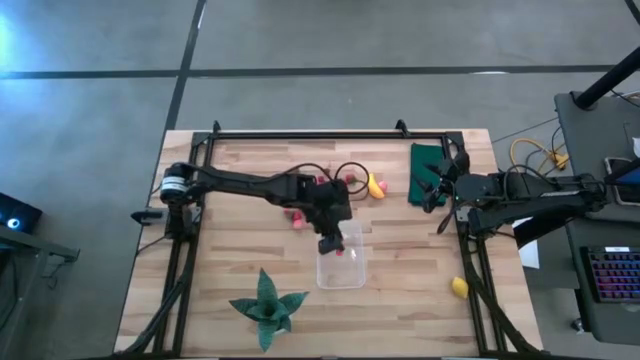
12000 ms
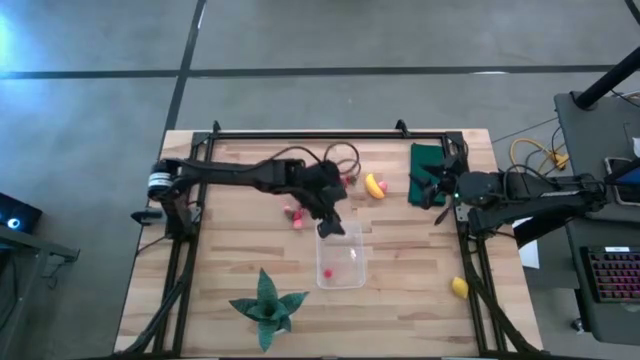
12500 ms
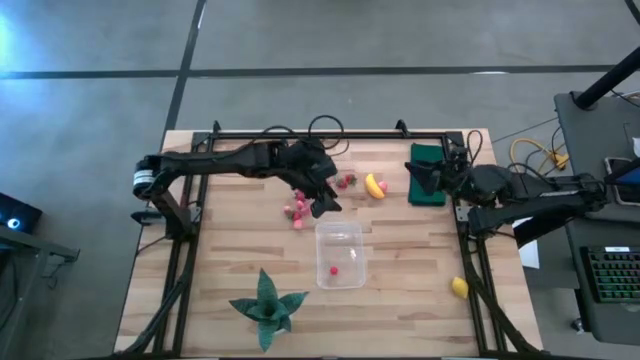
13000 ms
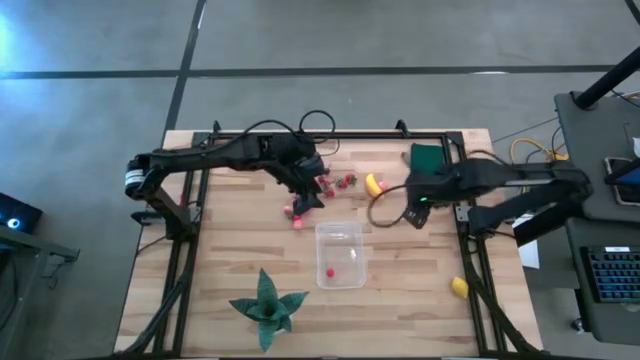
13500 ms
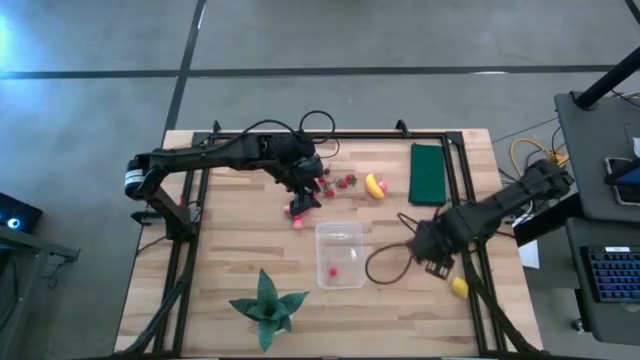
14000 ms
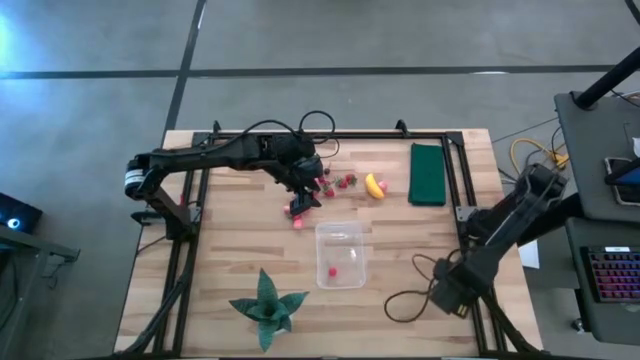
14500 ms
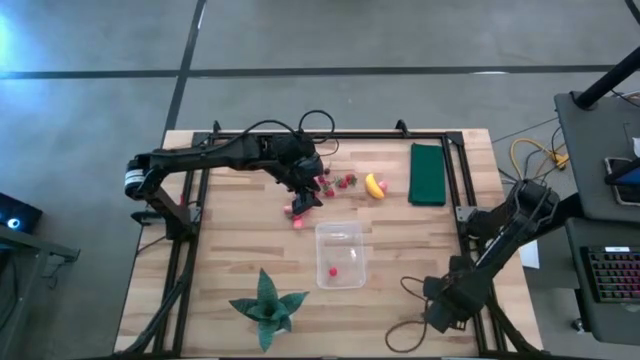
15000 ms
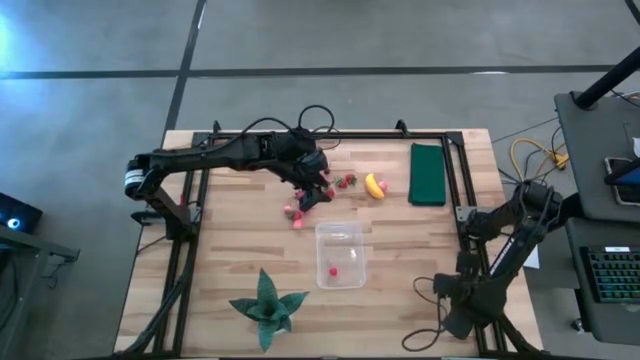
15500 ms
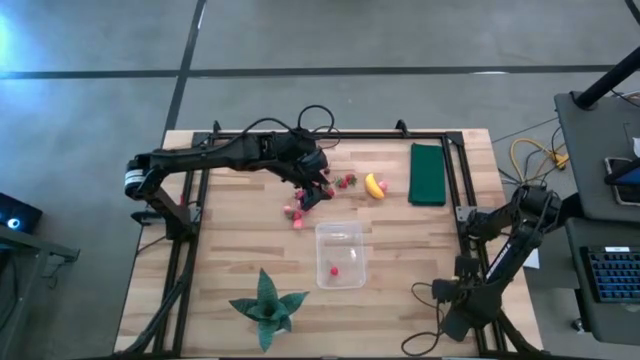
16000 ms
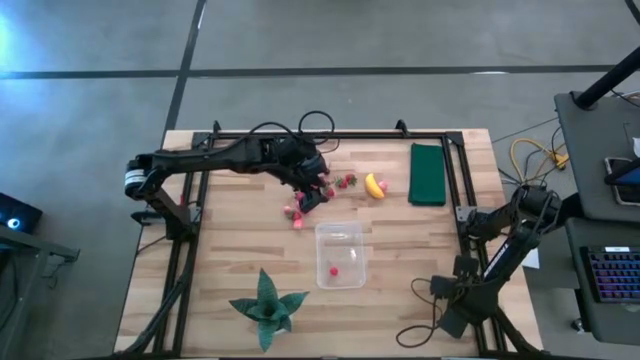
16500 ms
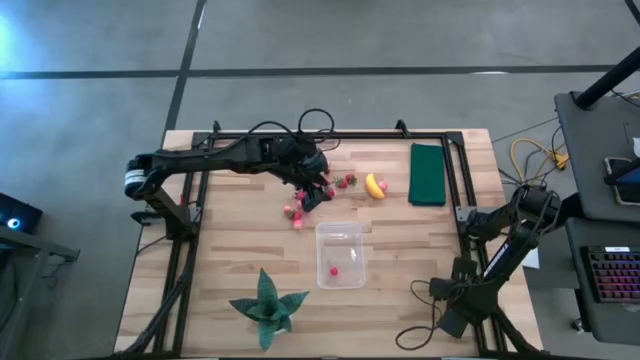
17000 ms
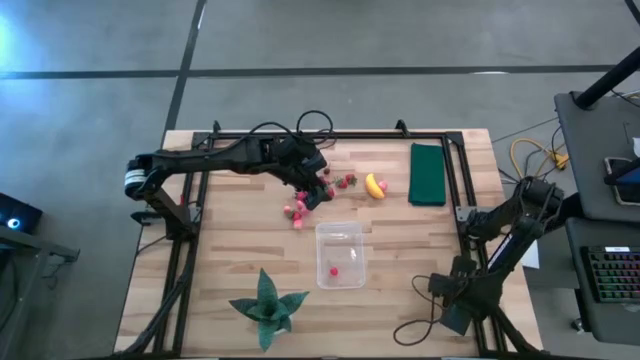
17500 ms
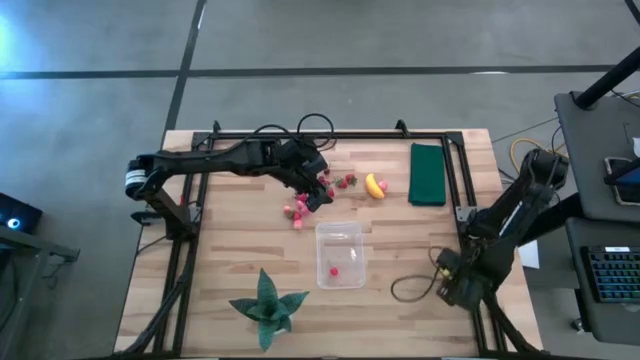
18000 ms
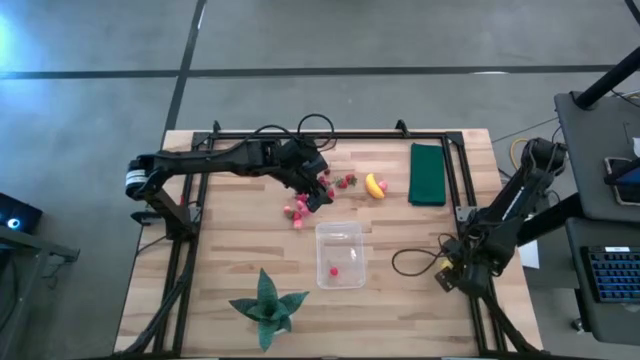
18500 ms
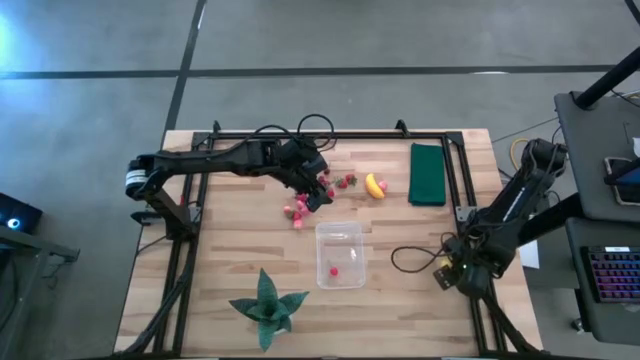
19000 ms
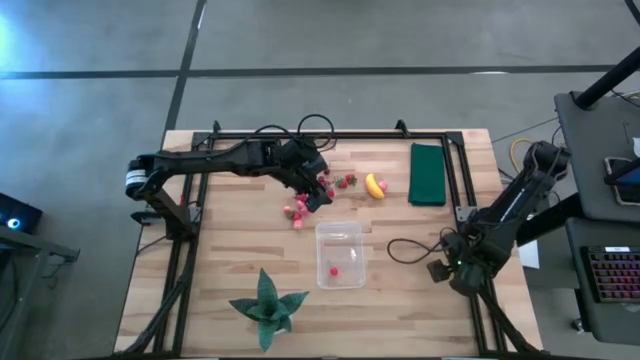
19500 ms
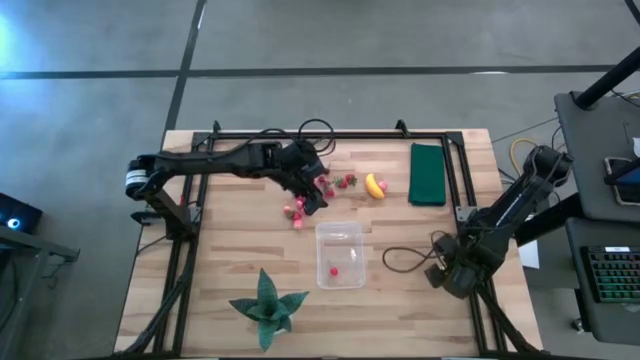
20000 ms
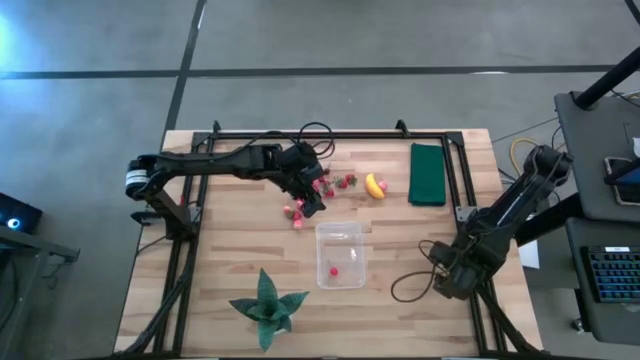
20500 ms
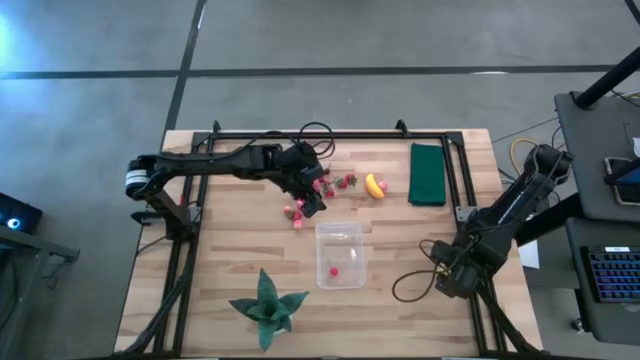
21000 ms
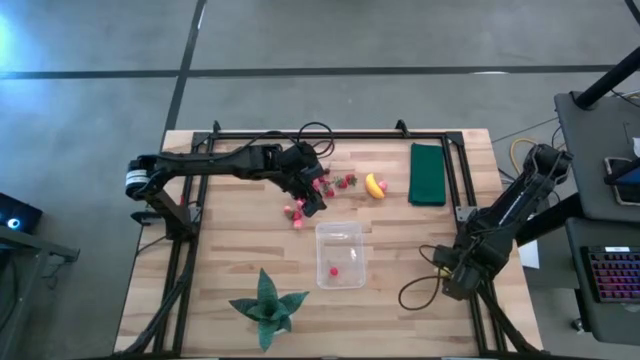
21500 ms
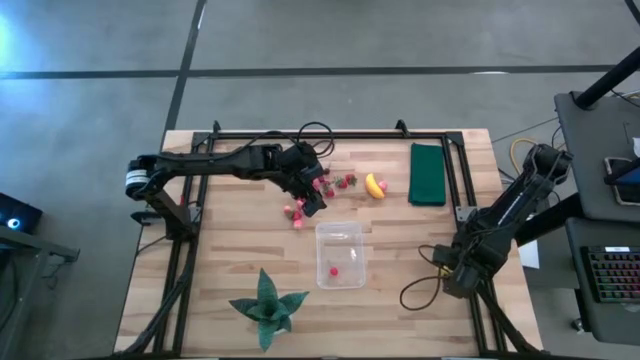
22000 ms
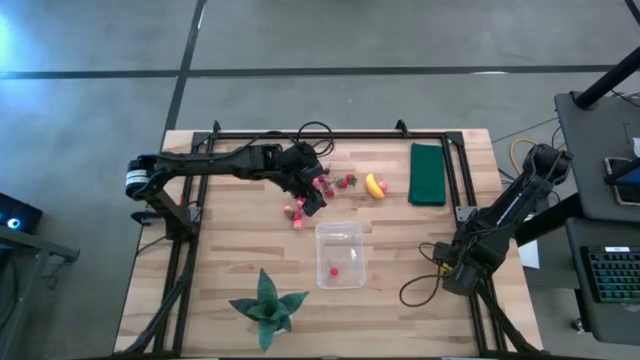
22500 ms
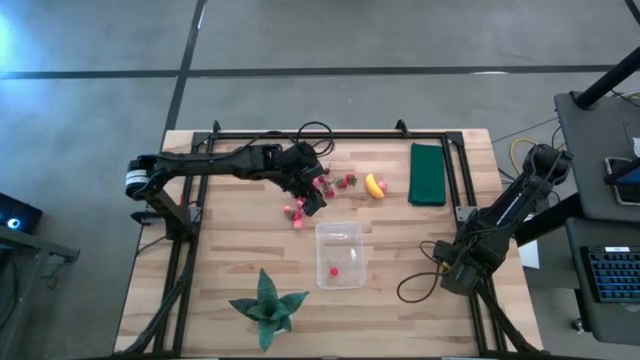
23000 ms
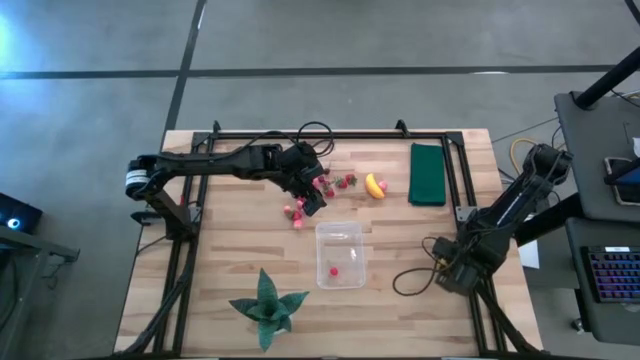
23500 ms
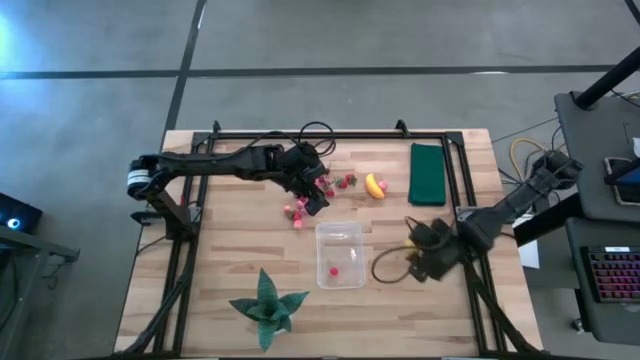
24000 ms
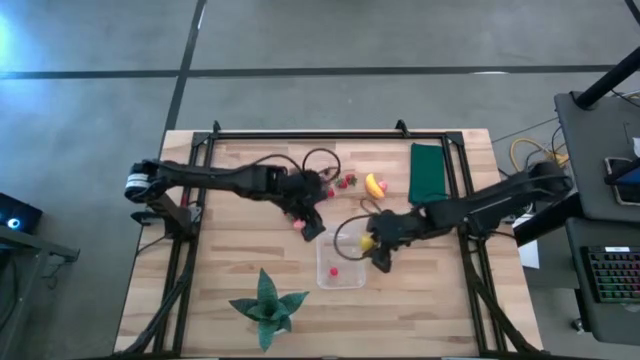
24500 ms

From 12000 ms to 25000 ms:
Task: Pick and placing Produce into tupperware
Put the lemon into the transparent bin

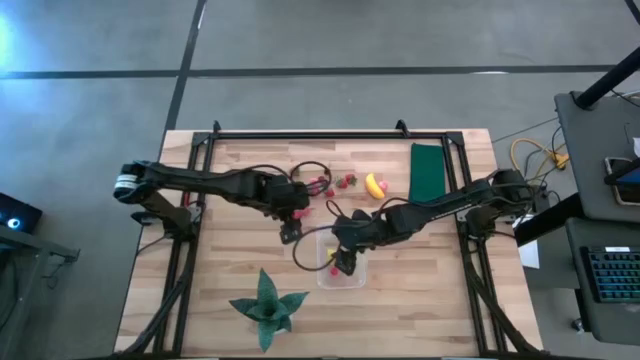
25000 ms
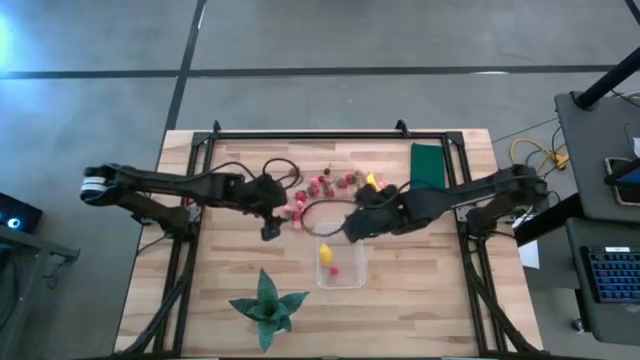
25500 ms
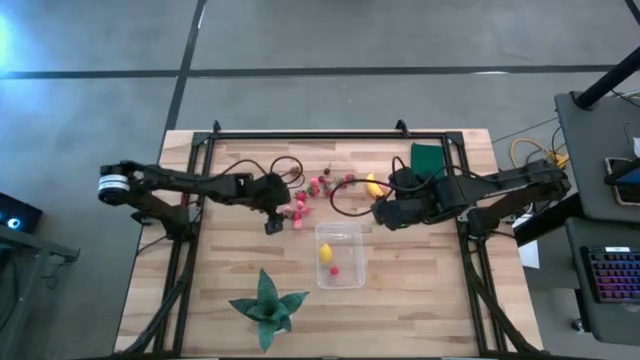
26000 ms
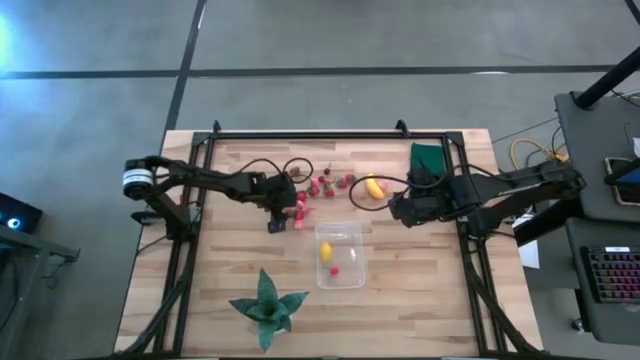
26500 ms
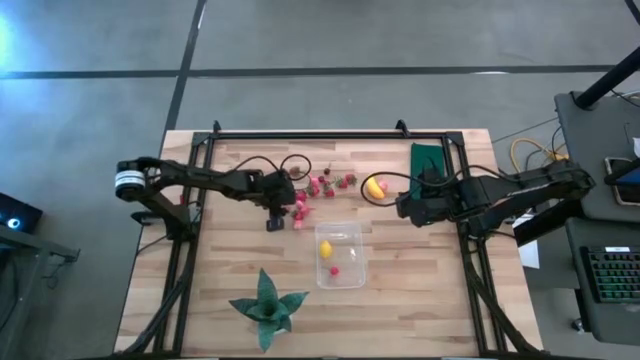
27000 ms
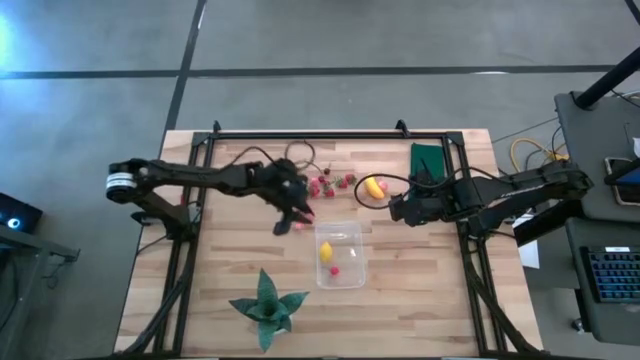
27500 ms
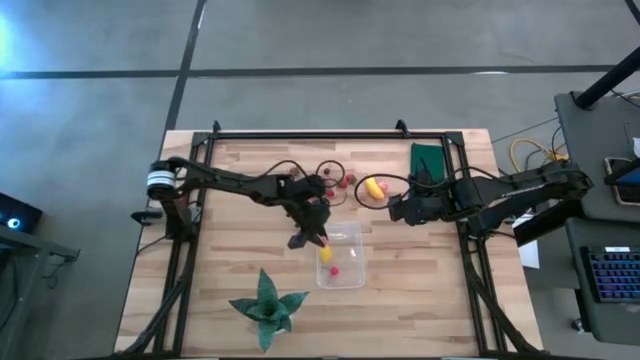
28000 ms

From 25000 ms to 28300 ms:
Put the apricot into the transparent bin

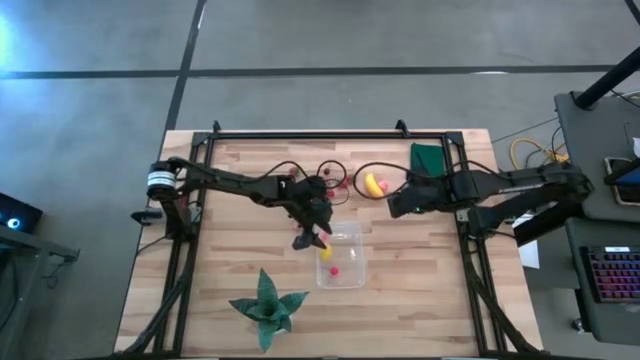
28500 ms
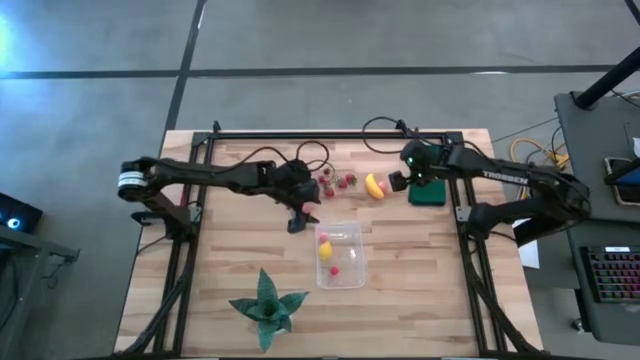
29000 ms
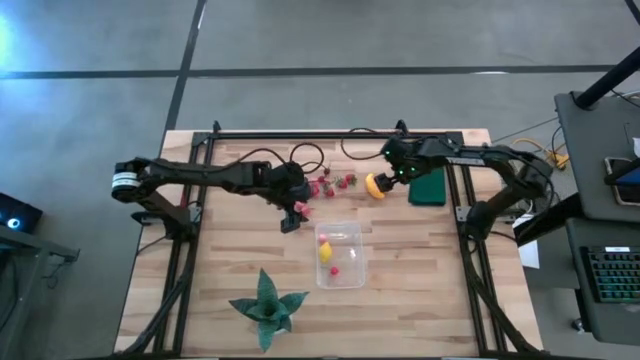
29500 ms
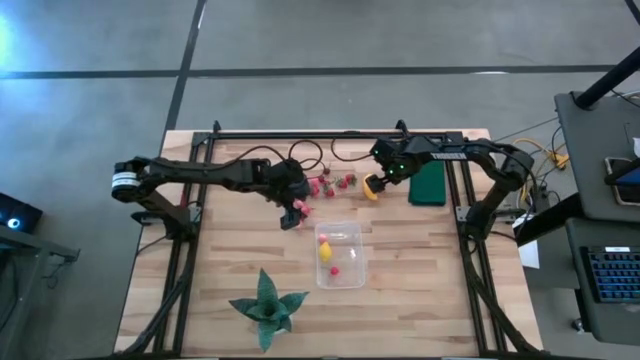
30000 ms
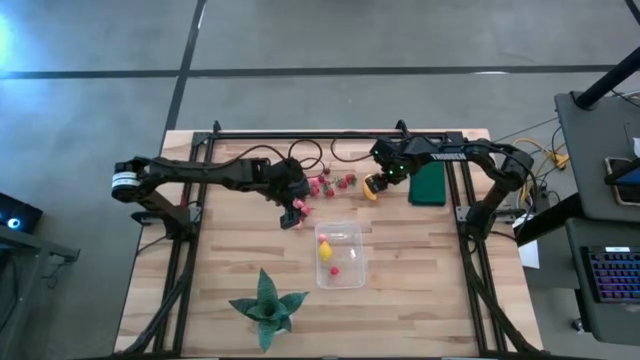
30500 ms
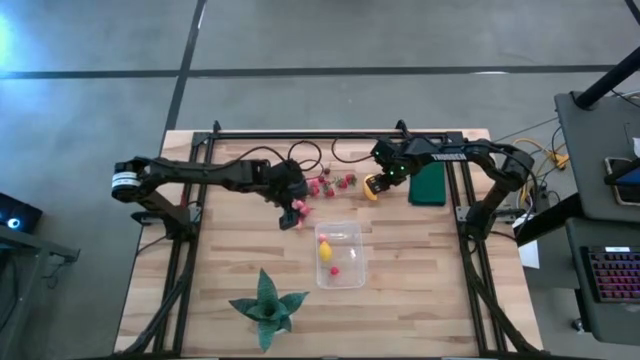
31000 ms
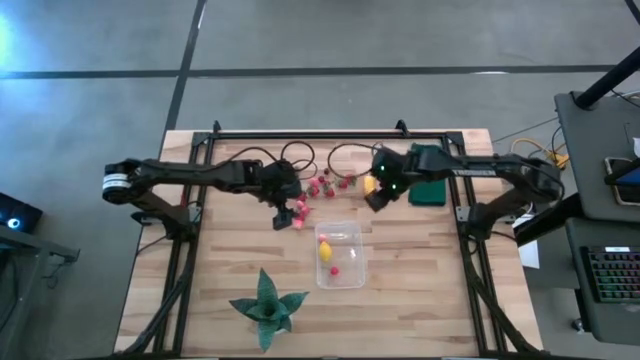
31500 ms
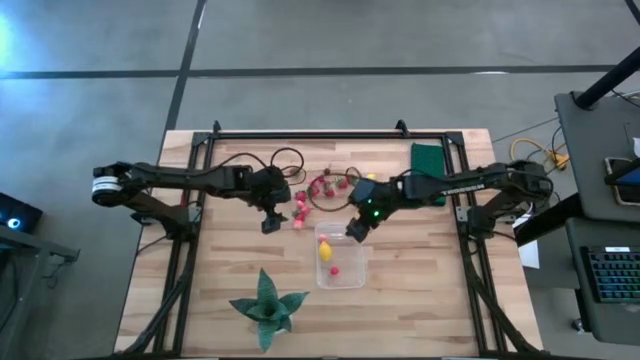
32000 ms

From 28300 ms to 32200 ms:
Put the apricot into the transparent bin

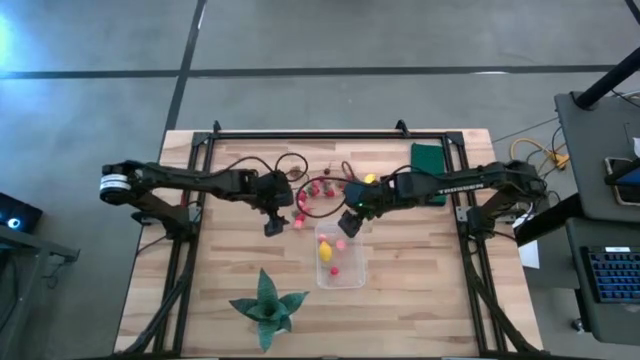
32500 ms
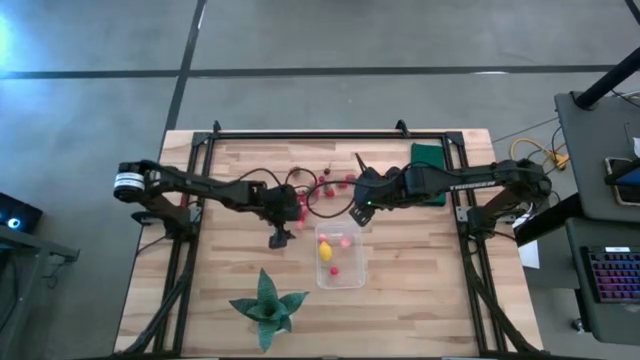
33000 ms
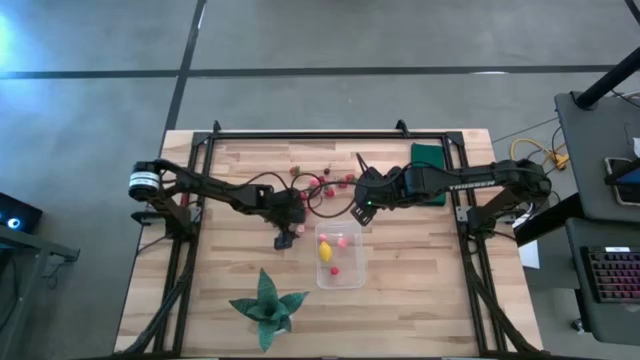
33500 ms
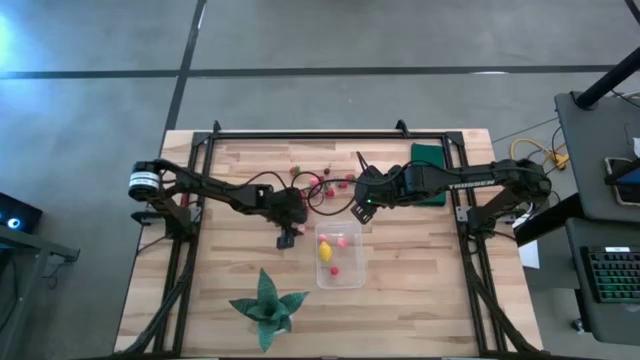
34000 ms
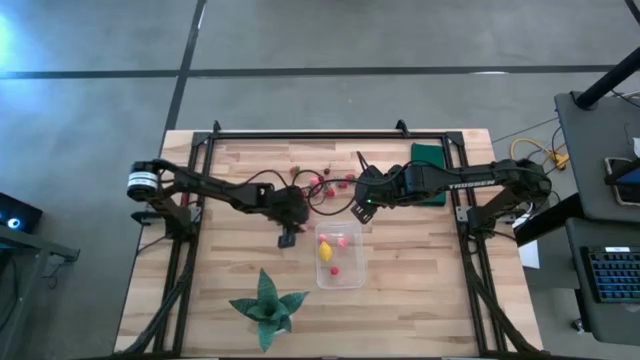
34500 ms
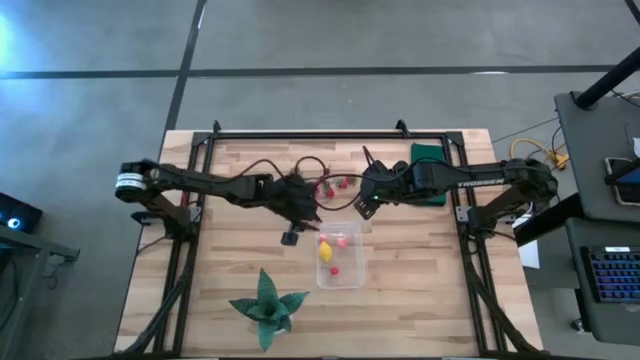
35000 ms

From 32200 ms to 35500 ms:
Put the apricot into the transparent bin
